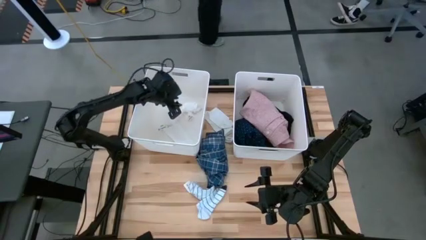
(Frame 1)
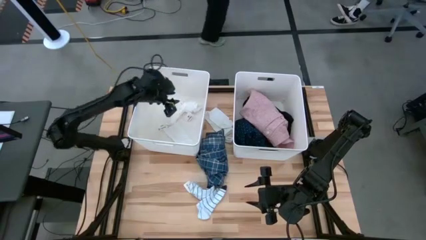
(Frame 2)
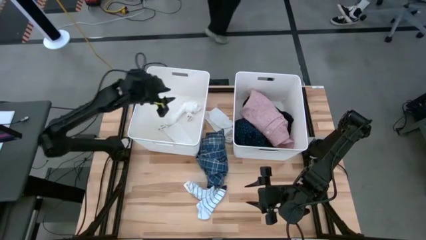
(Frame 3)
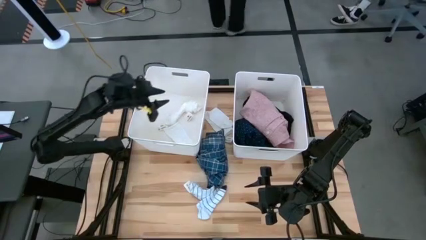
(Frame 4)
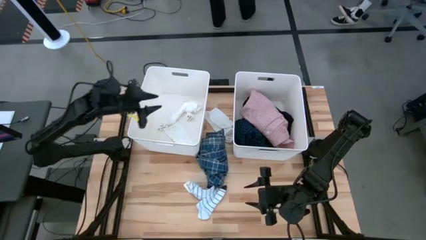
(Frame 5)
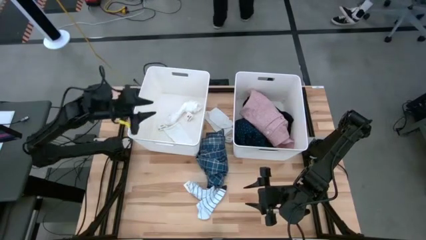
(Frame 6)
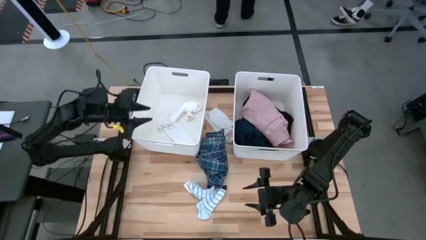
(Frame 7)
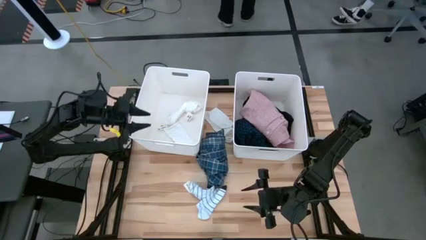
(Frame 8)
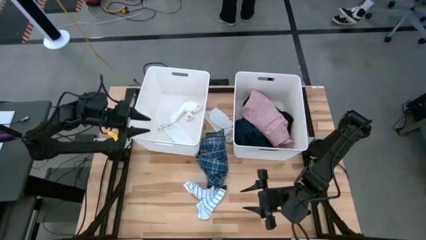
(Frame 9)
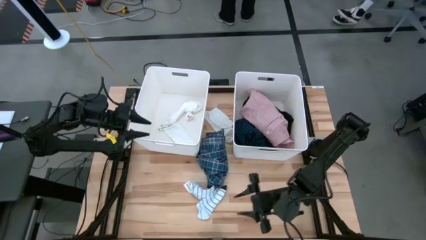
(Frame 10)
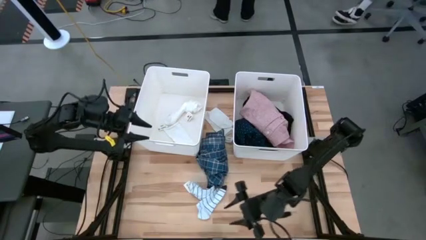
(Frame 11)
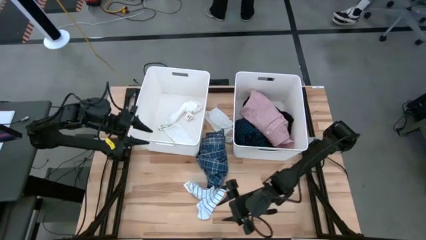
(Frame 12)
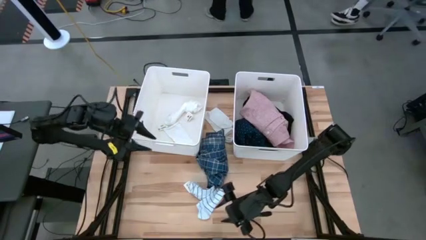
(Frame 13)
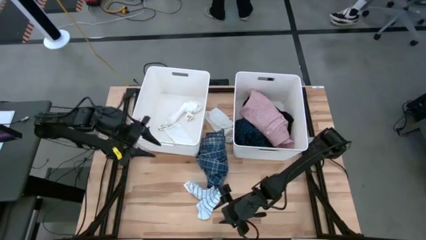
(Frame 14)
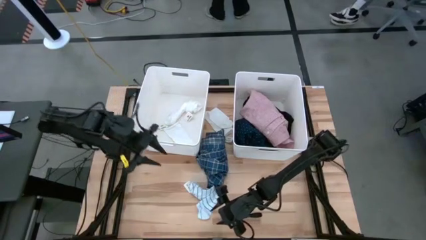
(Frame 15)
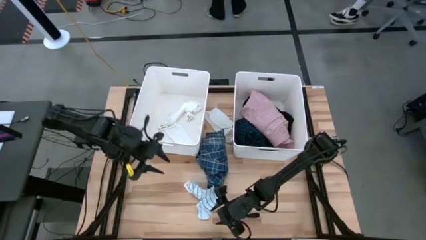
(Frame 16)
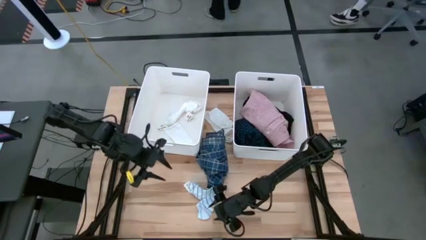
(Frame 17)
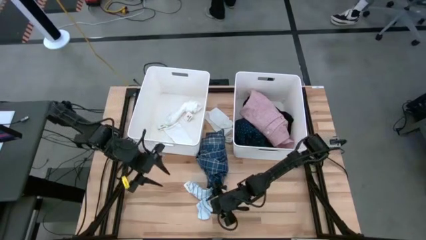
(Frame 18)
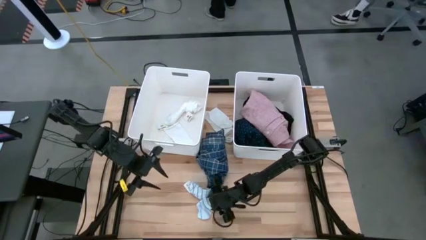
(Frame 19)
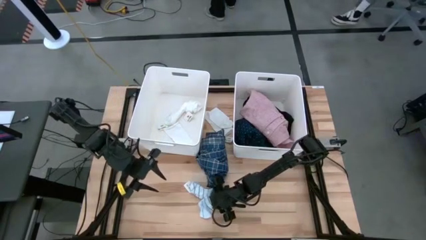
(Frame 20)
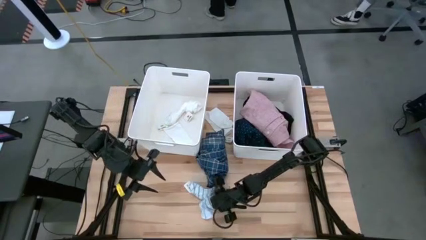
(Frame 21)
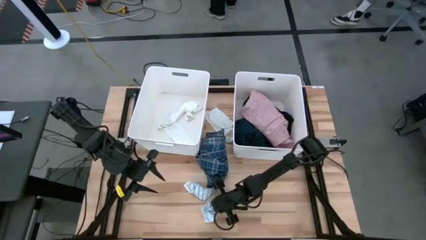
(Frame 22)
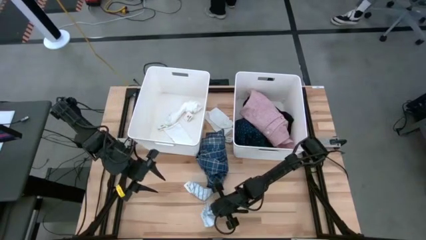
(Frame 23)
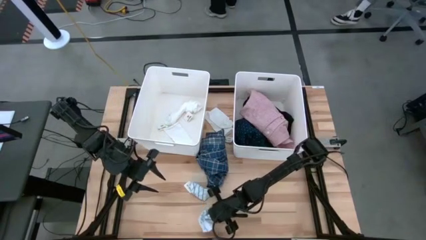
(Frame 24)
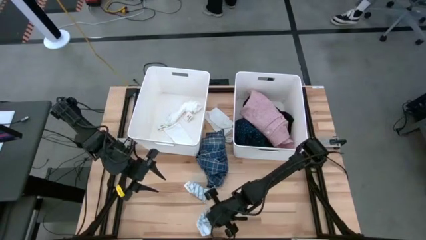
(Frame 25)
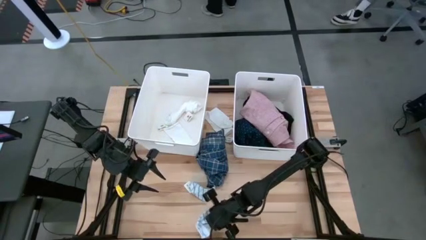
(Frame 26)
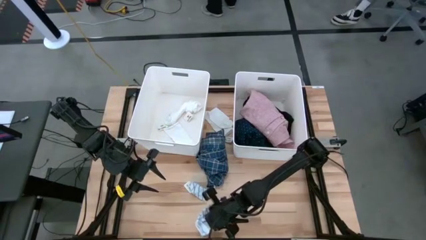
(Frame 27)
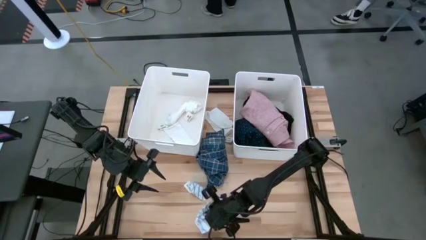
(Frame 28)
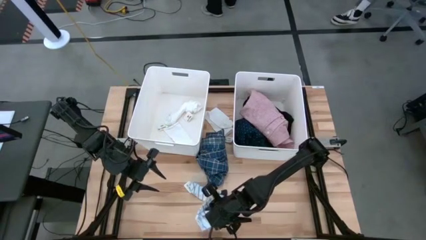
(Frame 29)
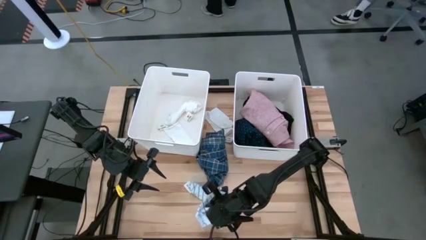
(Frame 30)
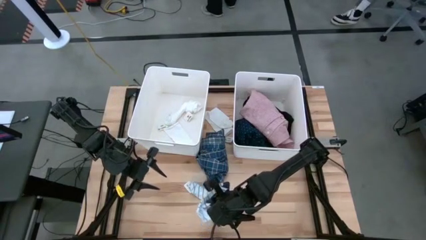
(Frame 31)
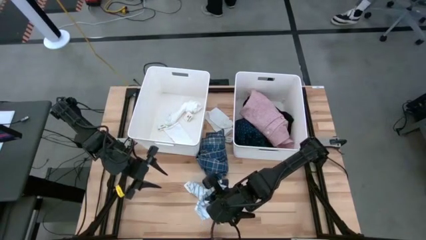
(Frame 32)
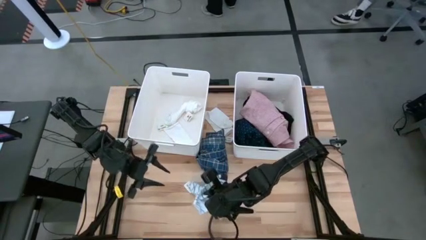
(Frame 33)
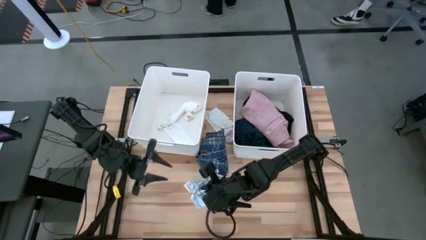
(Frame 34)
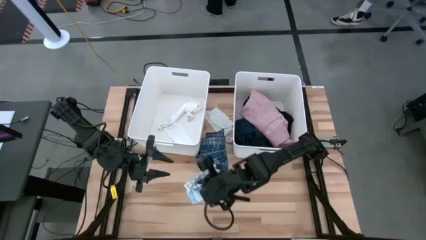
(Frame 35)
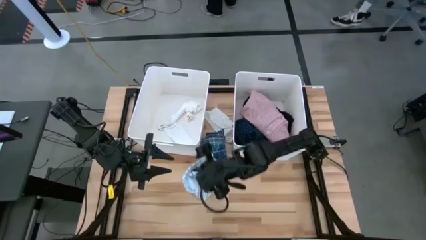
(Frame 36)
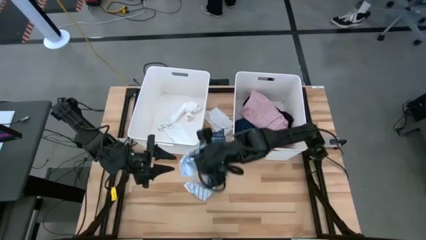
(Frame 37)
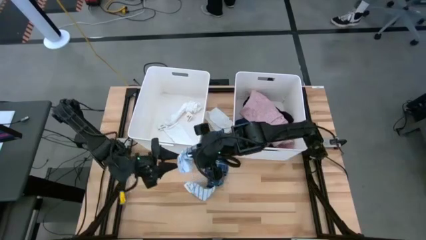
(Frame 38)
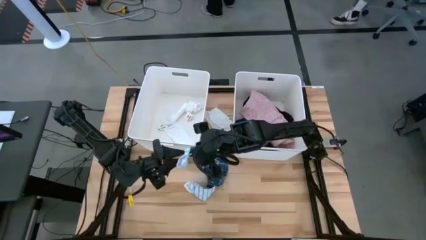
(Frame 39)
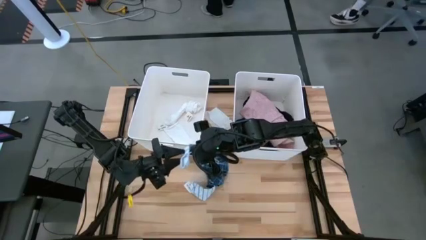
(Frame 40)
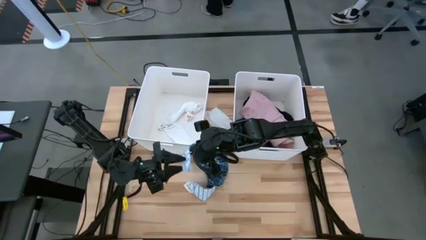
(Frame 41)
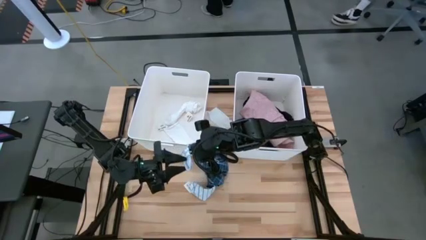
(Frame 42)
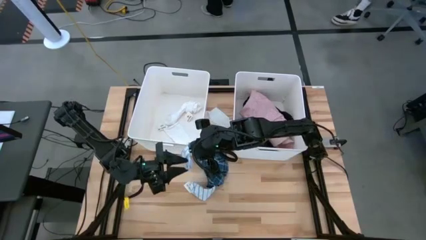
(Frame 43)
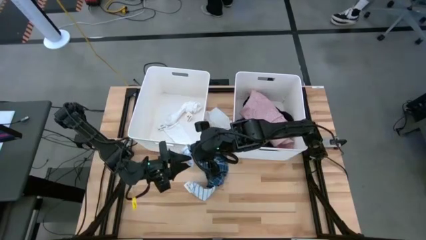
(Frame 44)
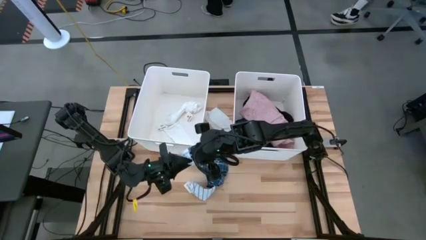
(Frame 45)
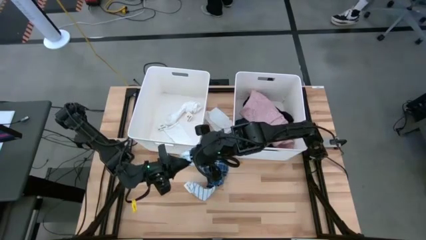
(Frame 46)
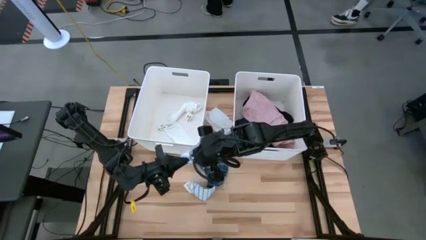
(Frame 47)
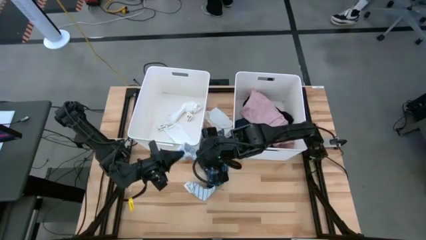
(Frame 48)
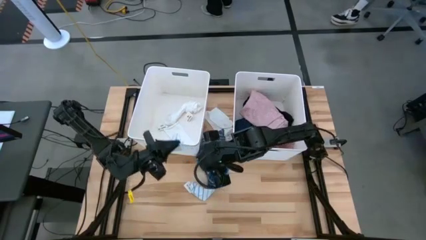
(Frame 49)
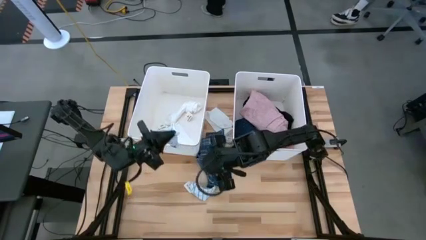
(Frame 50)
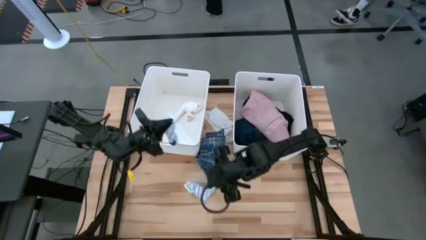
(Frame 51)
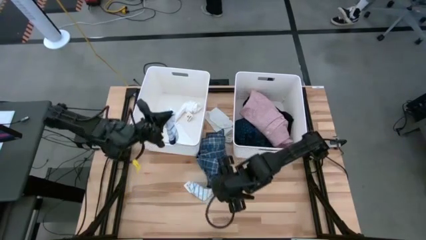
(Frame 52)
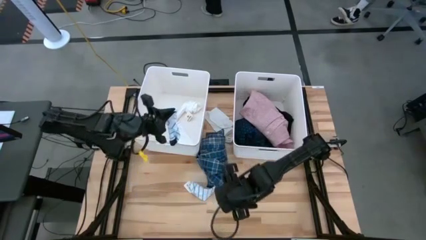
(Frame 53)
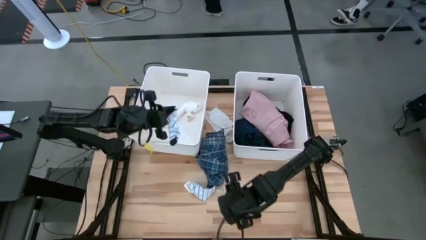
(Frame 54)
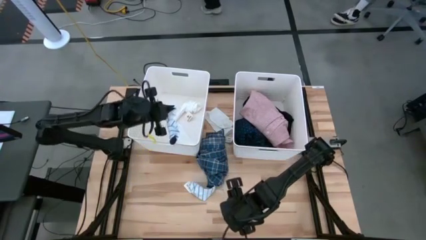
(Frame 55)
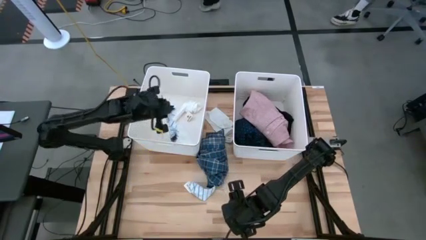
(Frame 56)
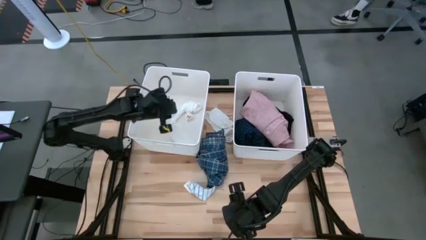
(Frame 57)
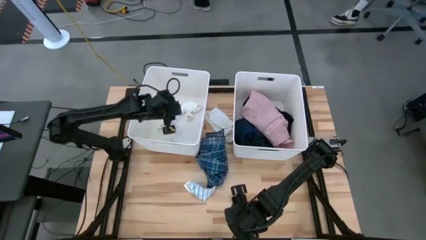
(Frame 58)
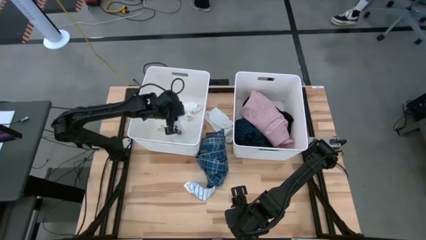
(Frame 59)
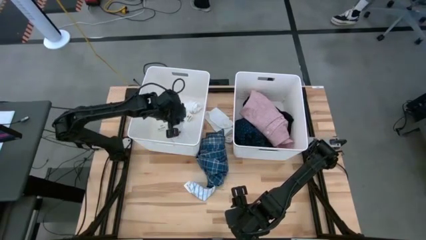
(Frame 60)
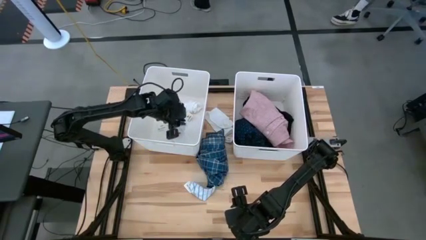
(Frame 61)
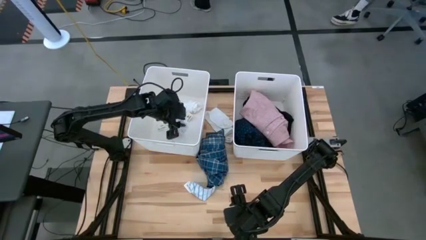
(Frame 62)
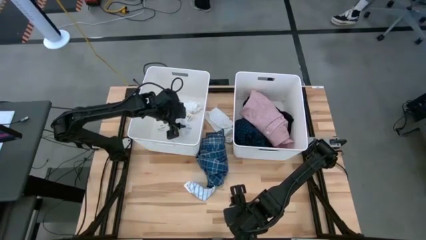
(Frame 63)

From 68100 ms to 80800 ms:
Task: Sort clothes
Put the right blue striped sock into the left white laundry bin

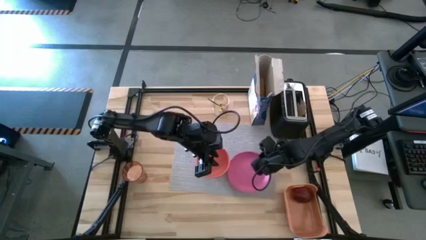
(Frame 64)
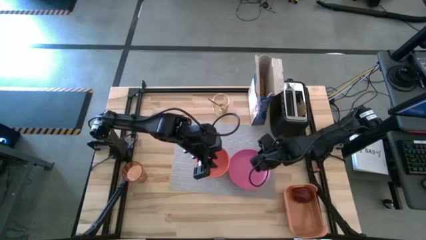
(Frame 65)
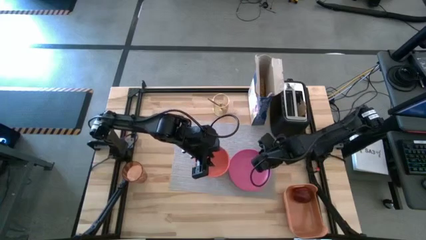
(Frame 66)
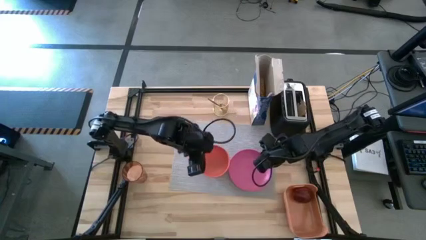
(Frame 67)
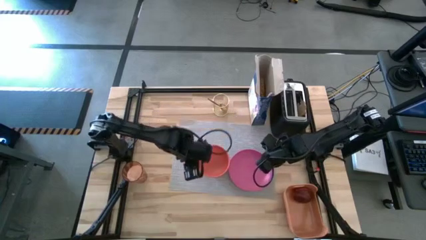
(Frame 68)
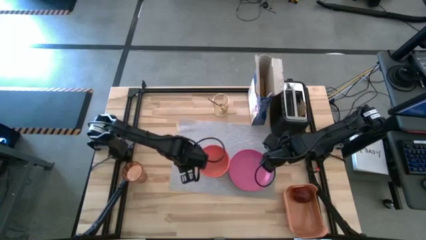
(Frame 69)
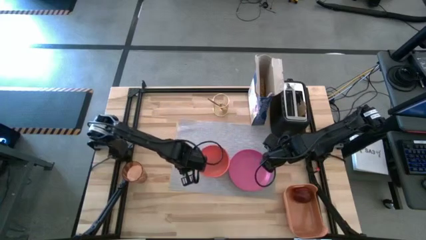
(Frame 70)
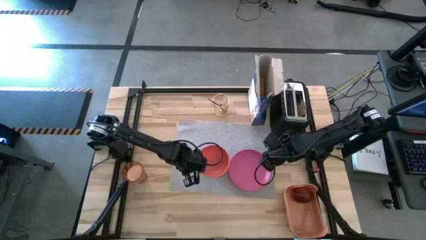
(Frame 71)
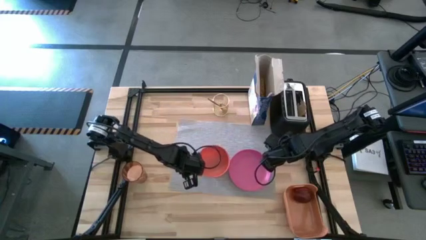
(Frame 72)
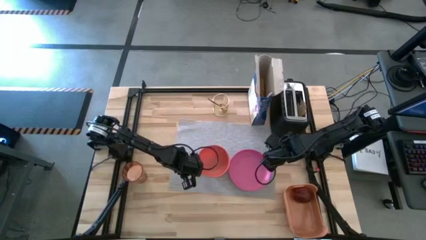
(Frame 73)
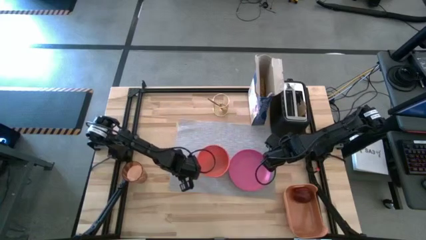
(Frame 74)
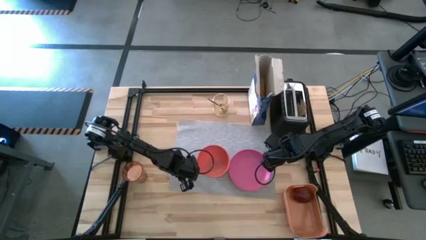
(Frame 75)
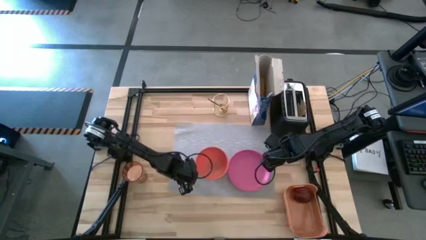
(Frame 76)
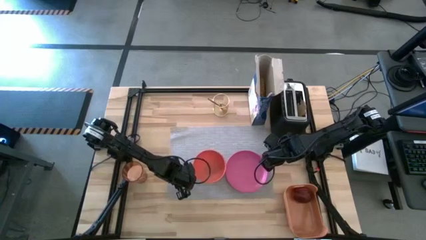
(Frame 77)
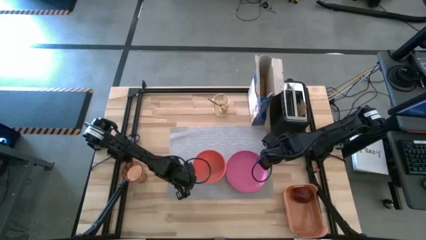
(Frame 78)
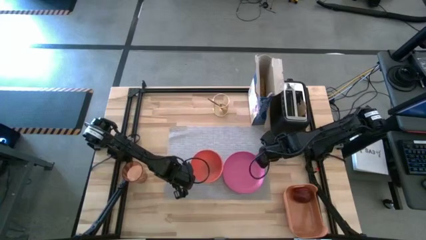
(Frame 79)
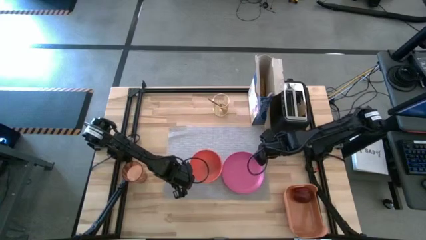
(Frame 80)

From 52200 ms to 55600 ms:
Task: Arrange a breakfast setting
Adjust the gray table mat
